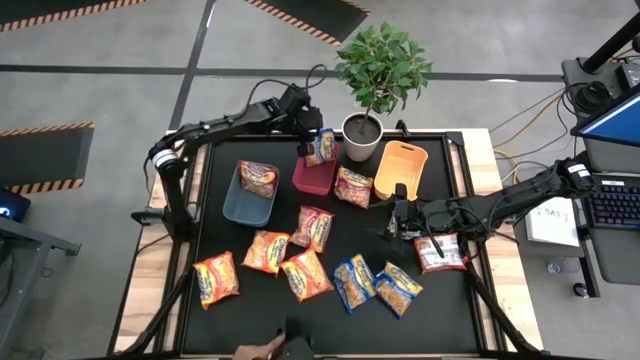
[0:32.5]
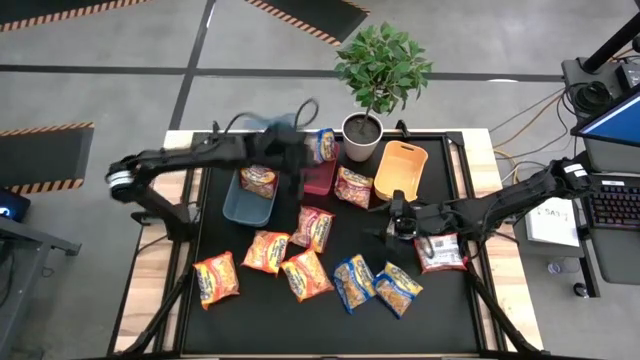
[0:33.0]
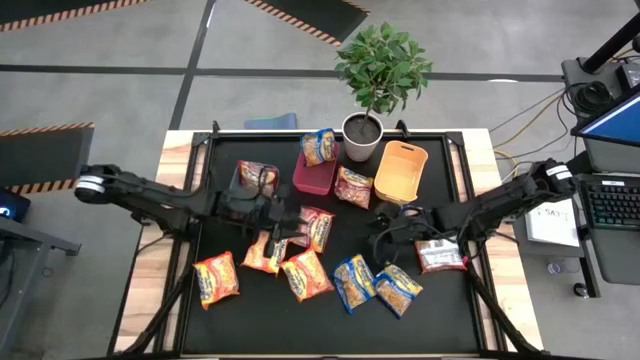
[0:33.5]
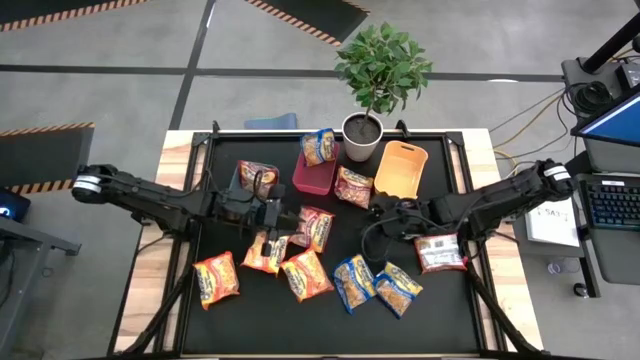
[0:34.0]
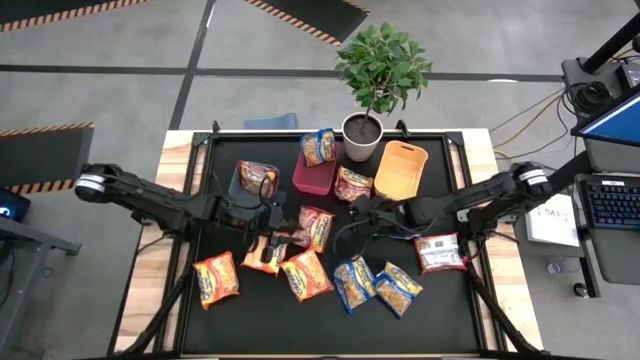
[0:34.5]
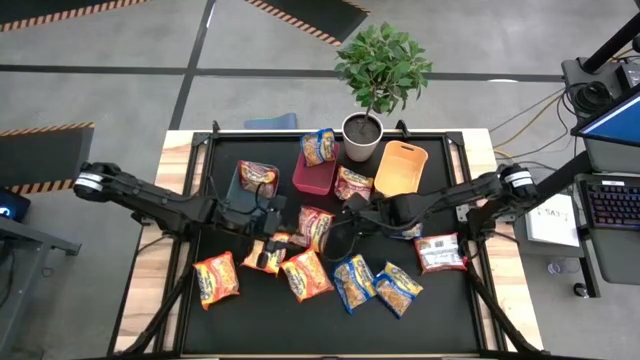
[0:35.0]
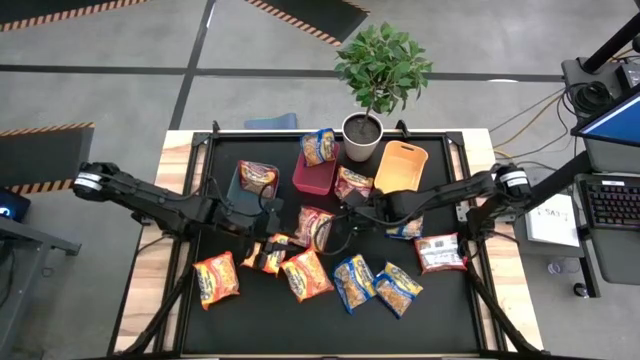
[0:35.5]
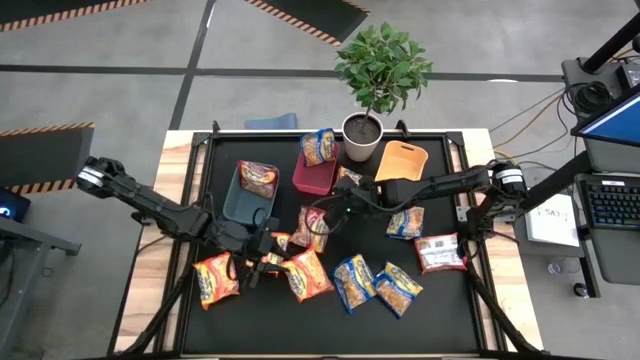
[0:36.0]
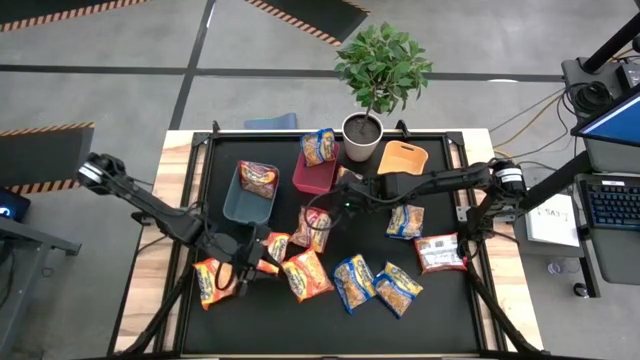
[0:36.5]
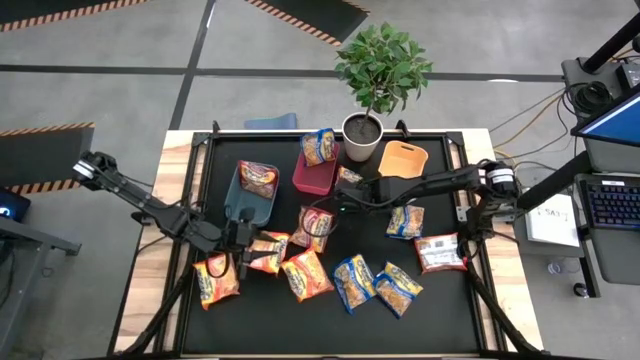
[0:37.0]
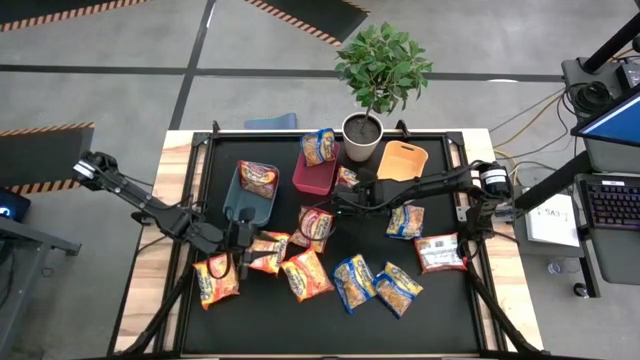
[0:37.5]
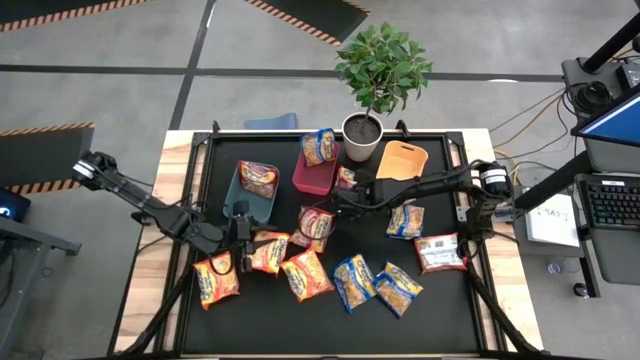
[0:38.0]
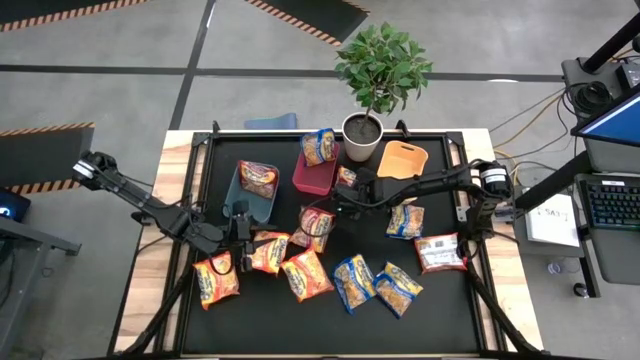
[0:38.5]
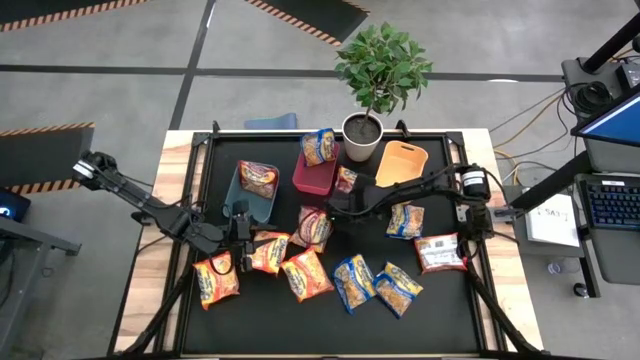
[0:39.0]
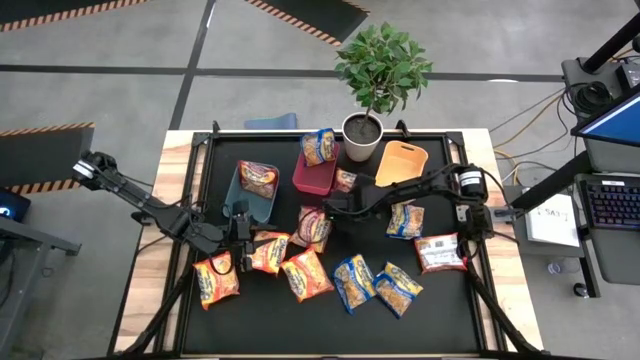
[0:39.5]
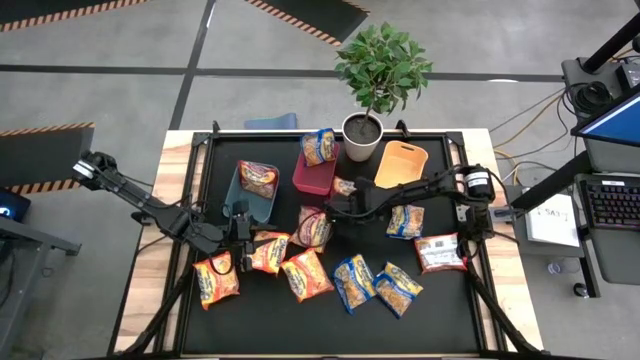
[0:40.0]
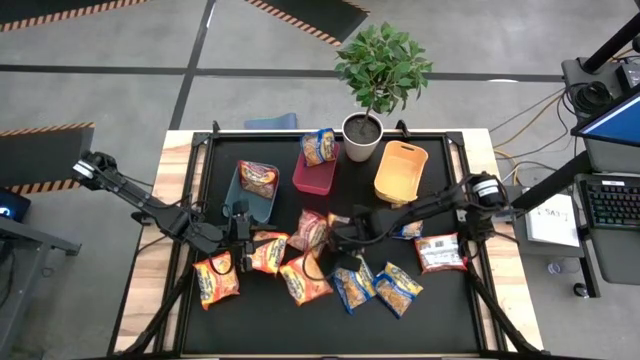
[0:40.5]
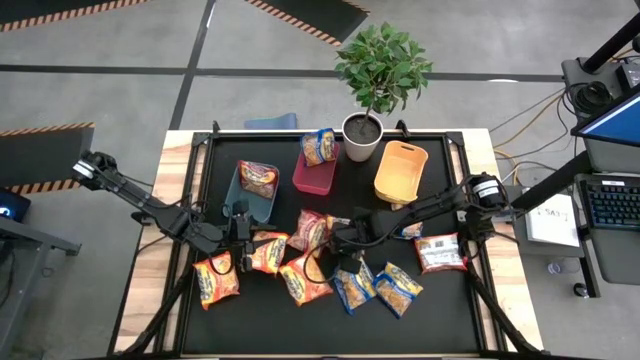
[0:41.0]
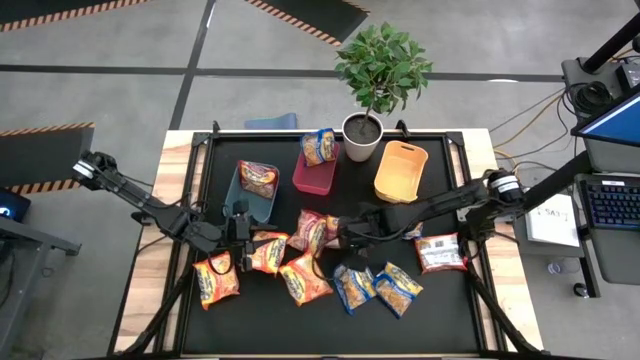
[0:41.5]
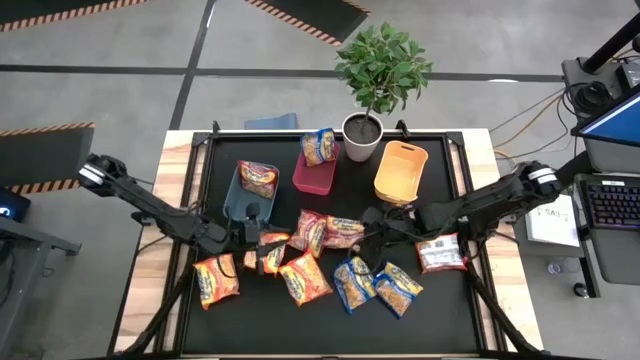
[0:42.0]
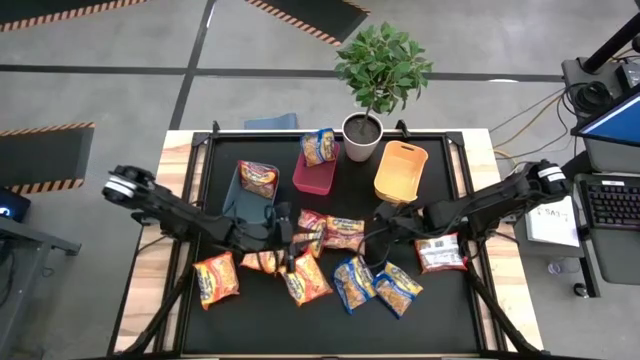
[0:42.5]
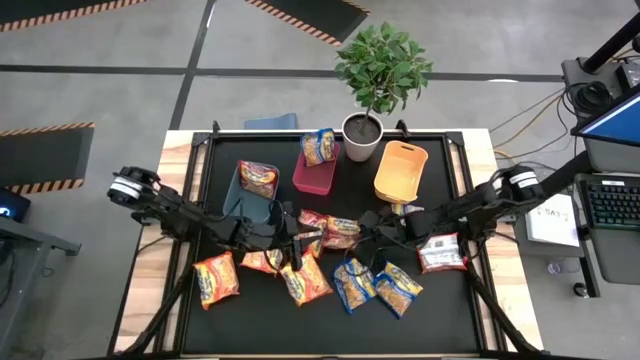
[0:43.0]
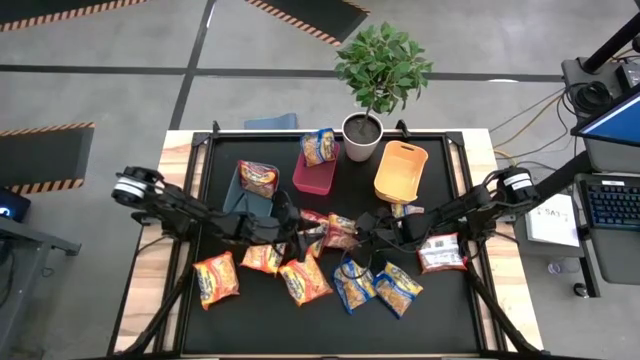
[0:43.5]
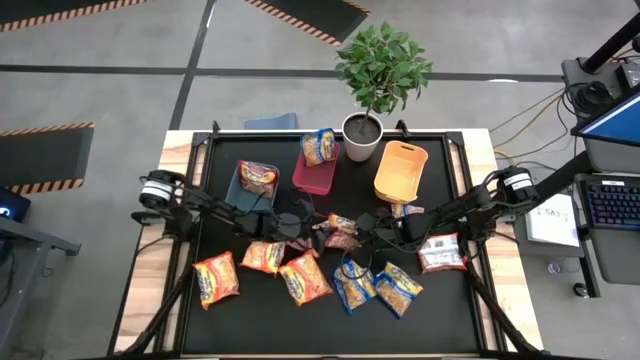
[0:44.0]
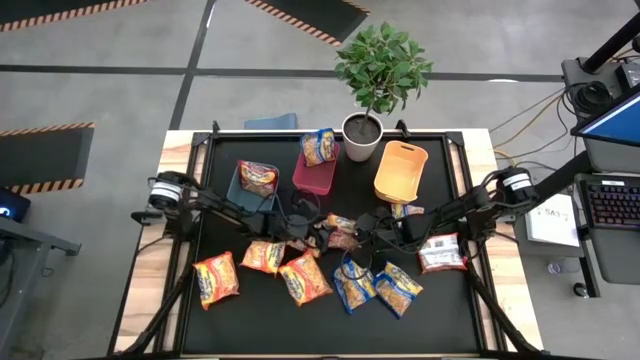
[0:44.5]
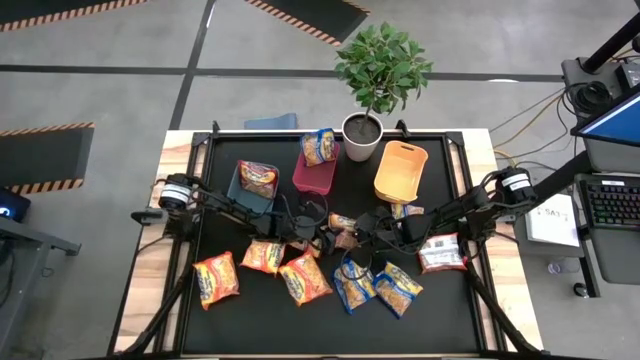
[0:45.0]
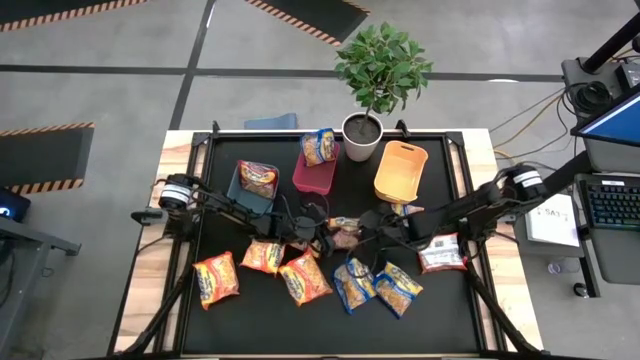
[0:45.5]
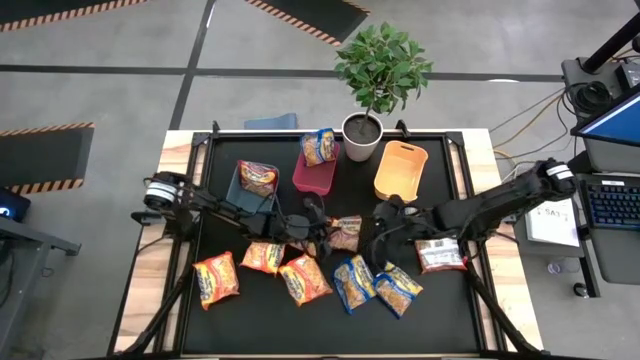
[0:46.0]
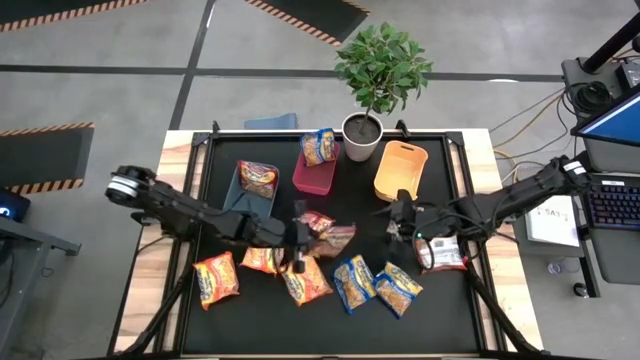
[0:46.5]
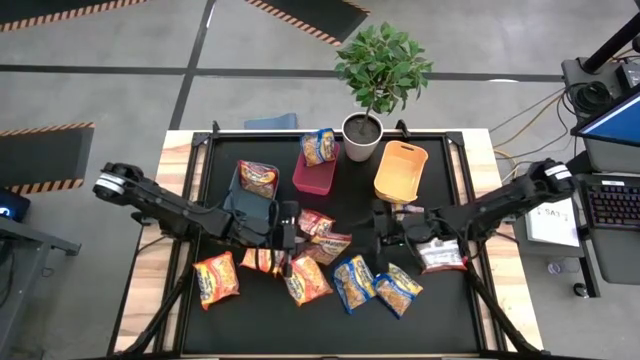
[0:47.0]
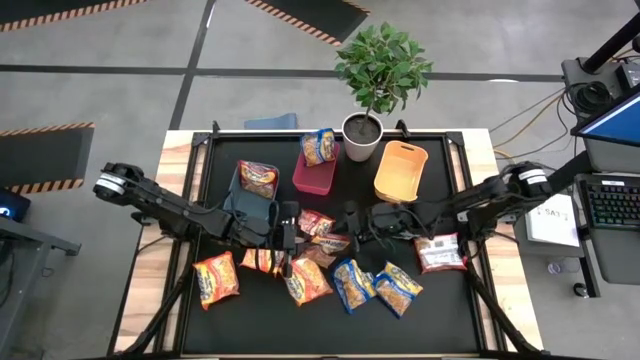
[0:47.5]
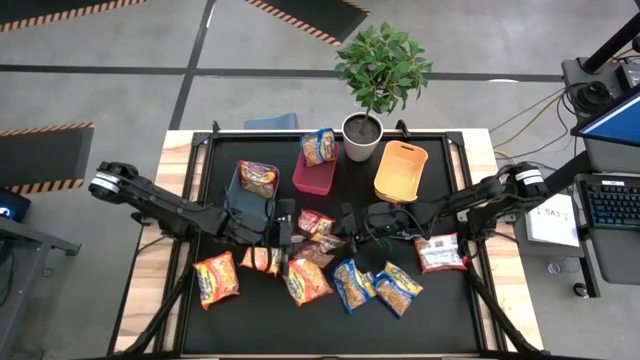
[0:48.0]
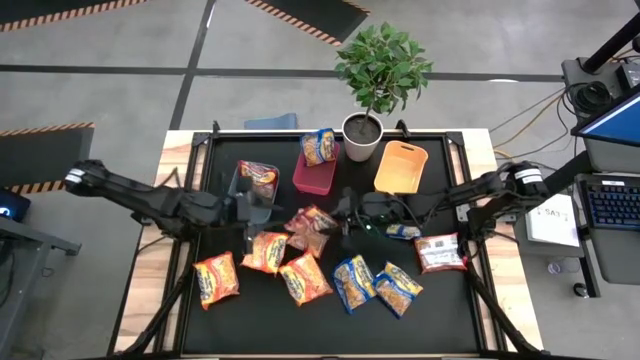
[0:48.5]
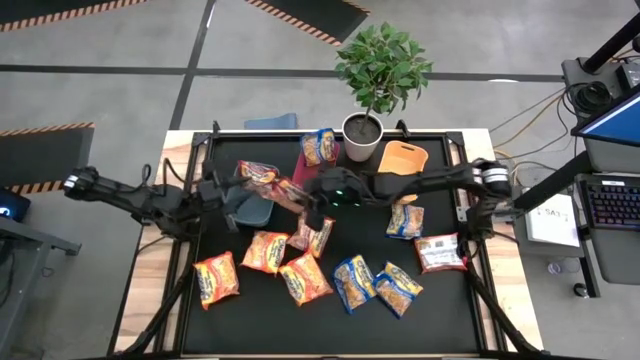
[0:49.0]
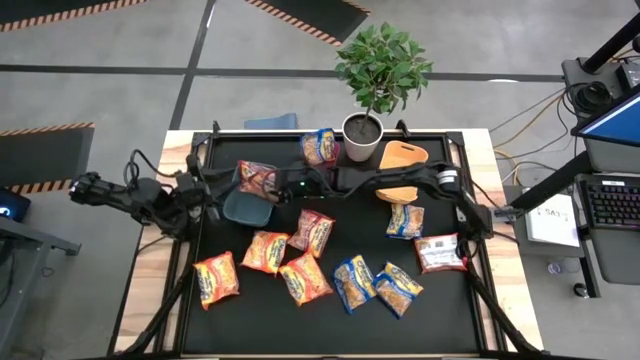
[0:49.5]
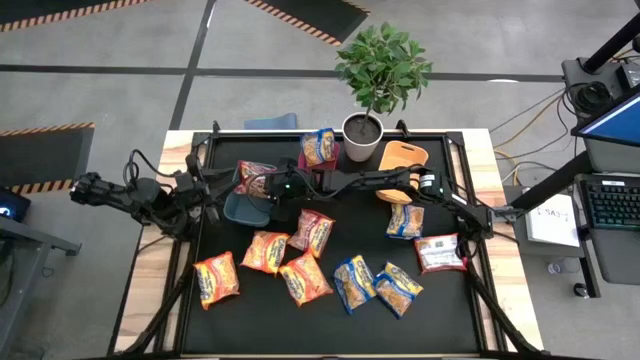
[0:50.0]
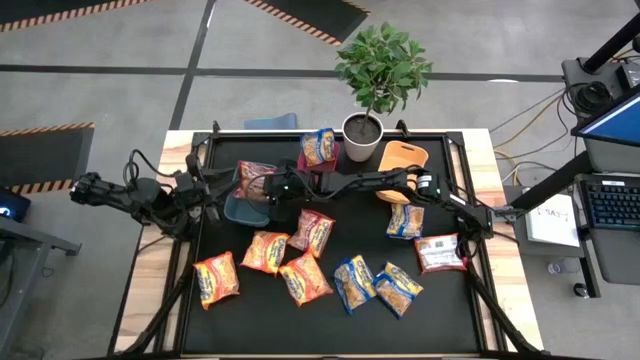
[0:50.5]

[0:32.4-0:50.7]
Task: Sort Maruchan noodles
Put top red noodle pack into the blue bin

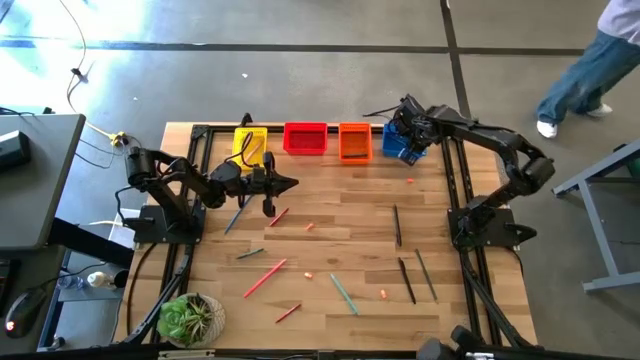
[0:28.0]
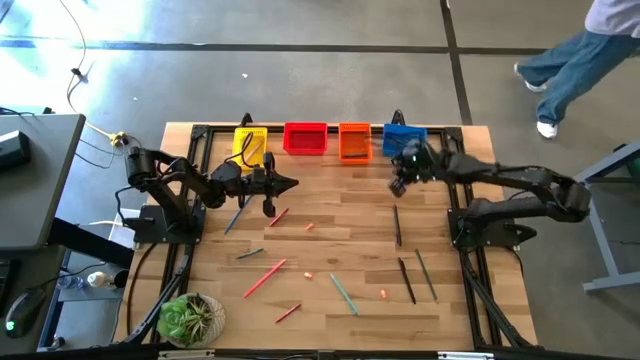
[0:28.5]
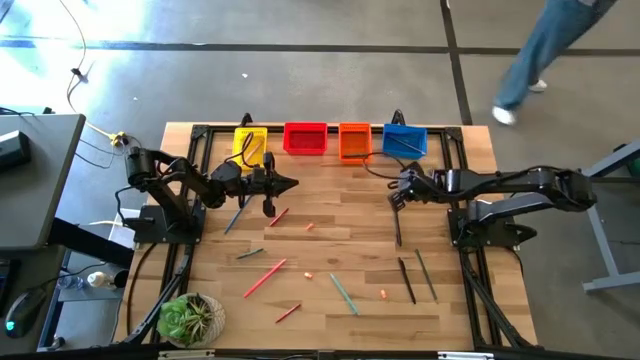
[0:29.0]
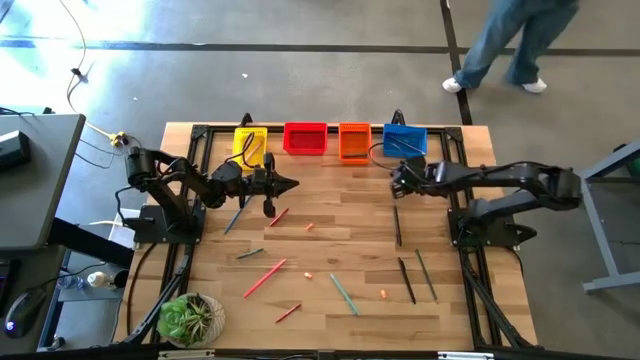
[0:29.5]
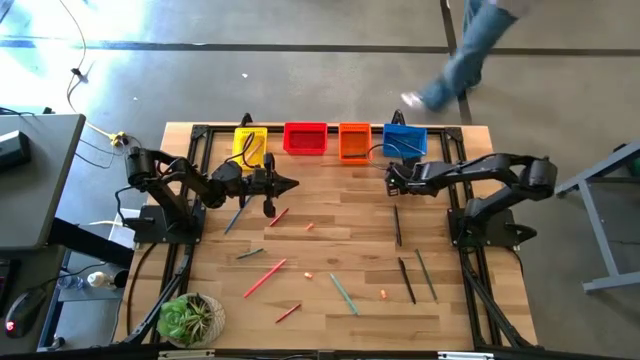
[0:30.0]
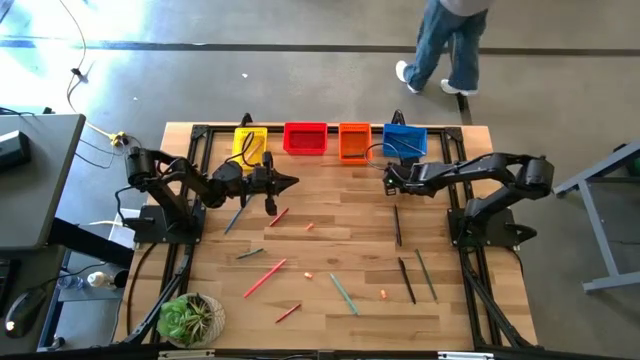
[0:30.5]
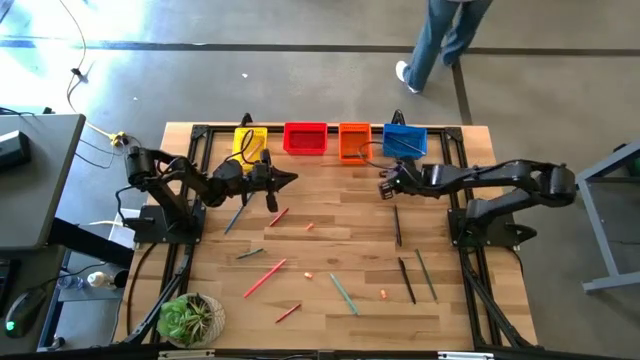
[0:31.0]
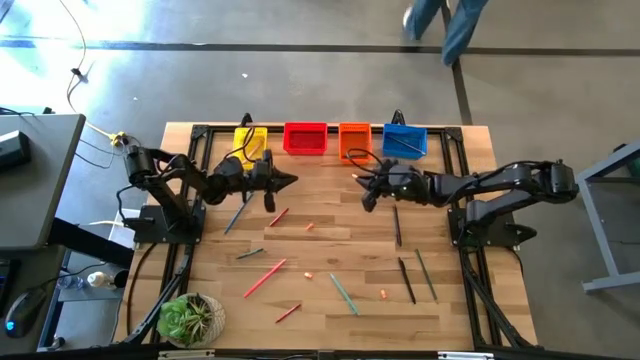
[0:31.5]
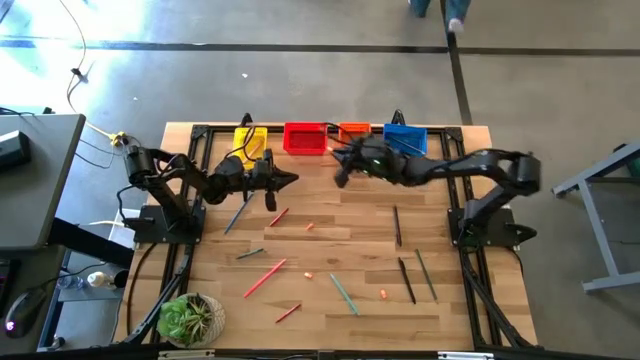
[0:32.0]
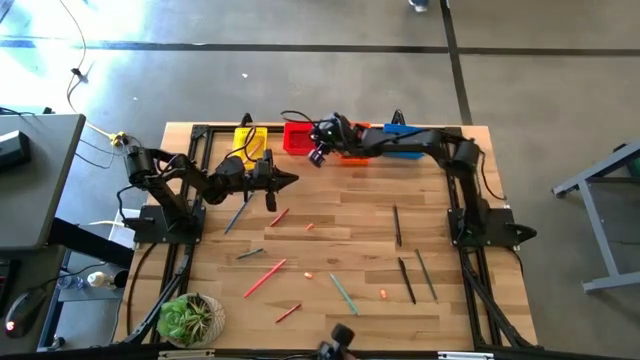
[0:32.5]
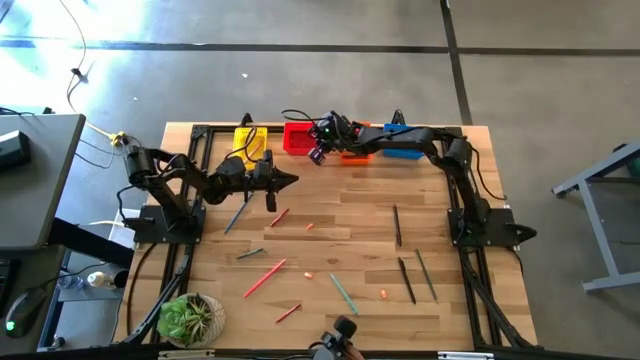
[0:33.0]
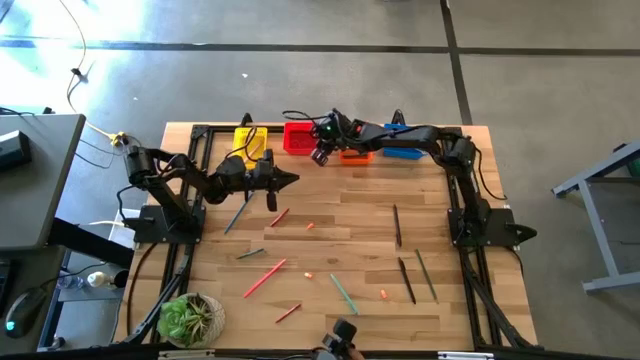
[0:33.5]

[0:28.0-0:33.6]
Task: Sort crayons/erasers/pens/pencils in bins
Put the orange eraser into the red basket
